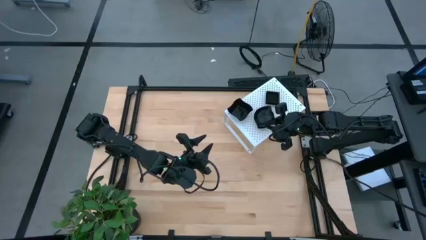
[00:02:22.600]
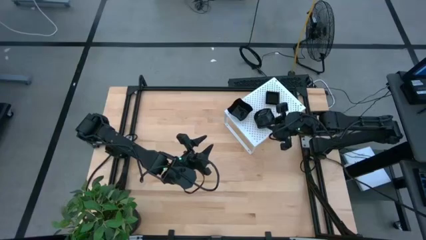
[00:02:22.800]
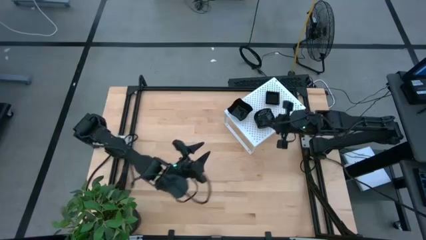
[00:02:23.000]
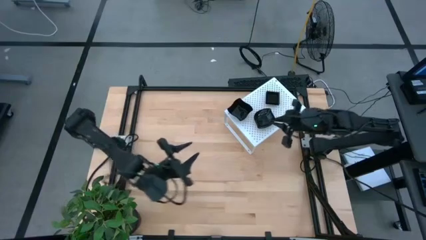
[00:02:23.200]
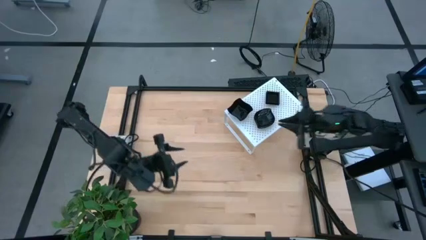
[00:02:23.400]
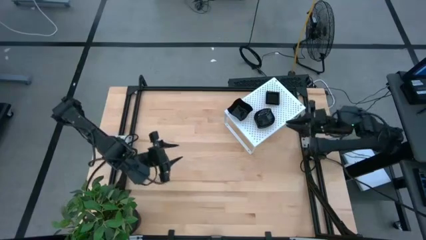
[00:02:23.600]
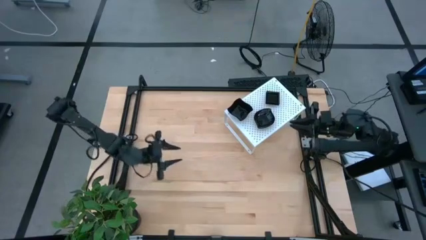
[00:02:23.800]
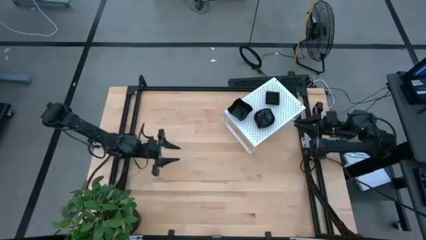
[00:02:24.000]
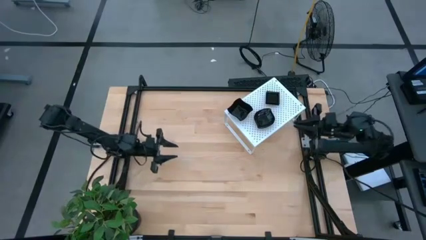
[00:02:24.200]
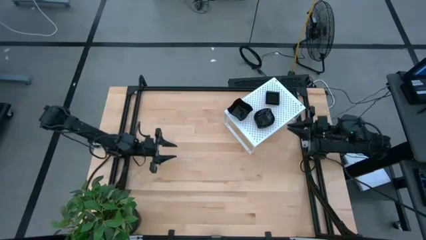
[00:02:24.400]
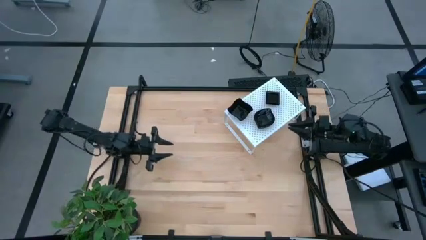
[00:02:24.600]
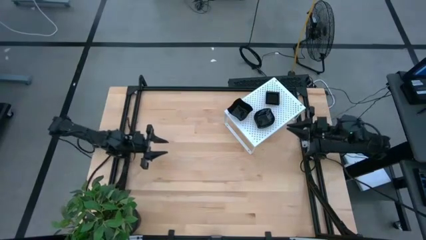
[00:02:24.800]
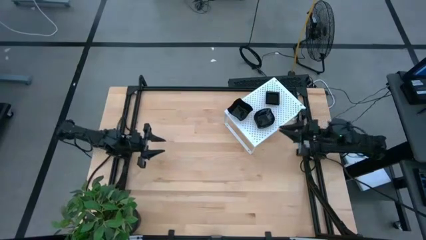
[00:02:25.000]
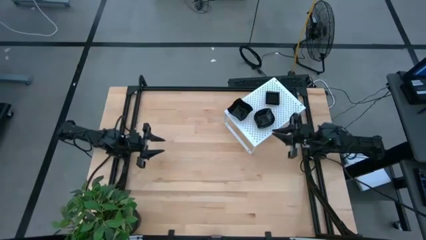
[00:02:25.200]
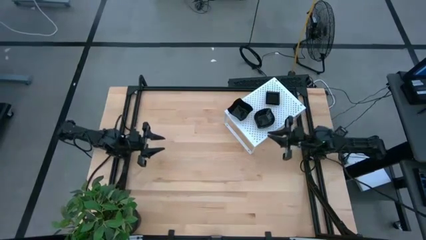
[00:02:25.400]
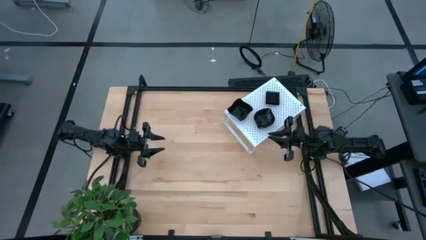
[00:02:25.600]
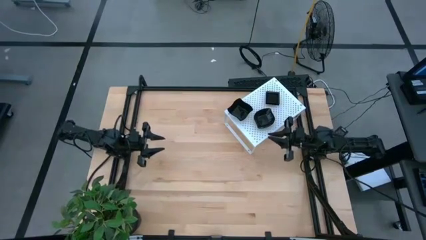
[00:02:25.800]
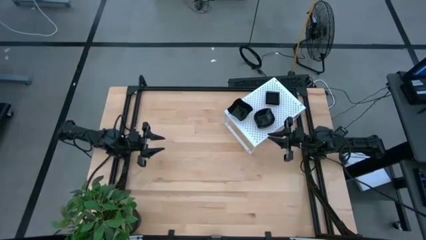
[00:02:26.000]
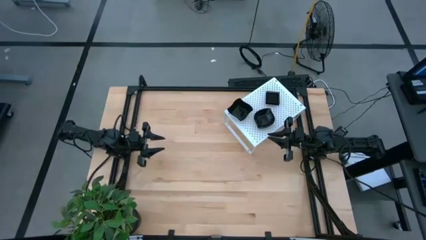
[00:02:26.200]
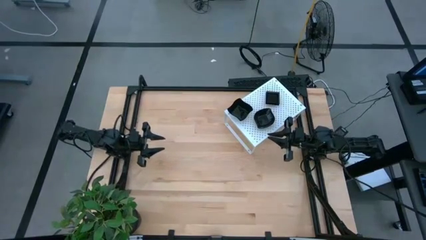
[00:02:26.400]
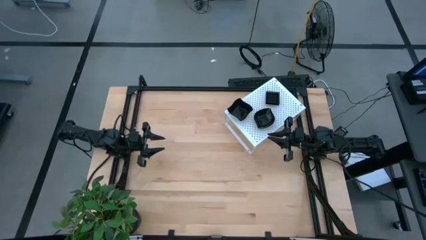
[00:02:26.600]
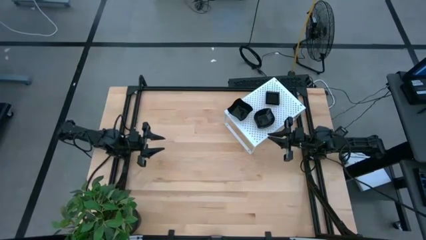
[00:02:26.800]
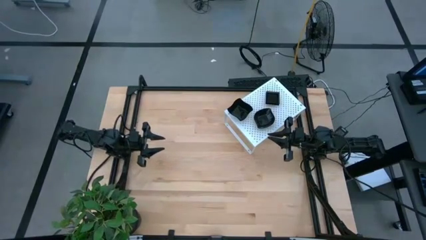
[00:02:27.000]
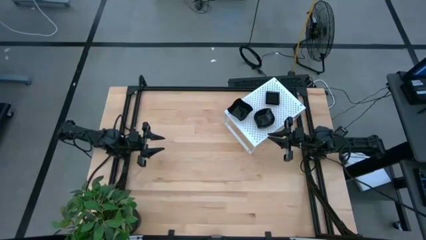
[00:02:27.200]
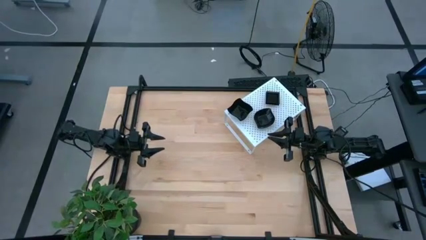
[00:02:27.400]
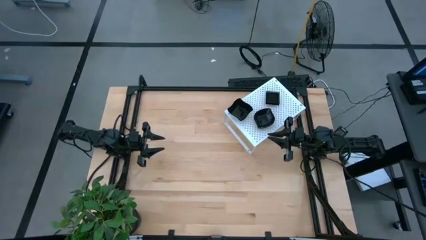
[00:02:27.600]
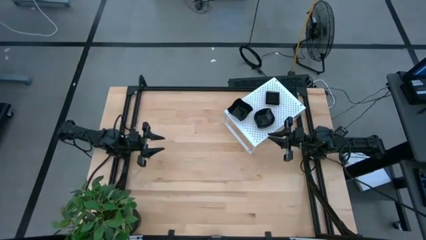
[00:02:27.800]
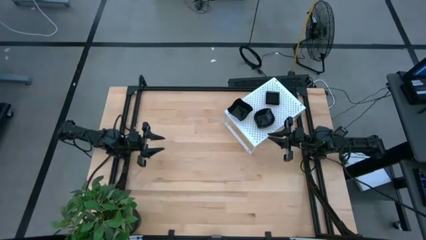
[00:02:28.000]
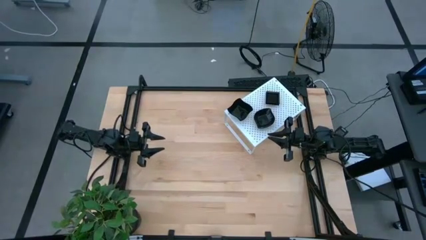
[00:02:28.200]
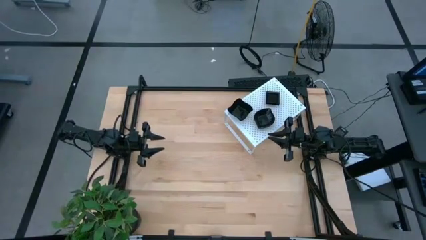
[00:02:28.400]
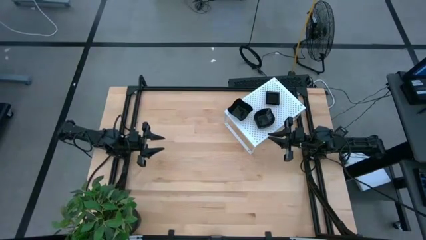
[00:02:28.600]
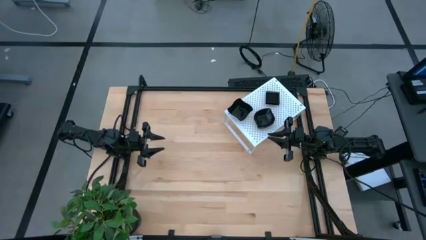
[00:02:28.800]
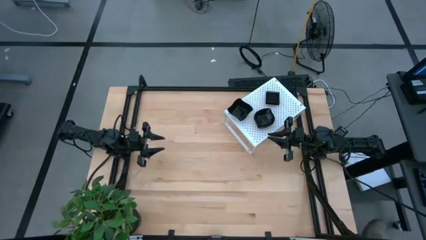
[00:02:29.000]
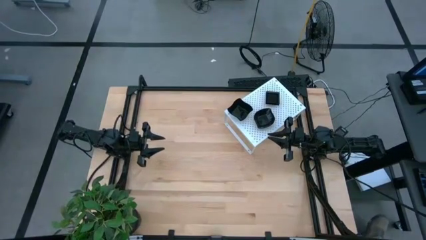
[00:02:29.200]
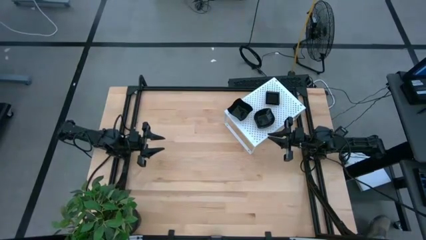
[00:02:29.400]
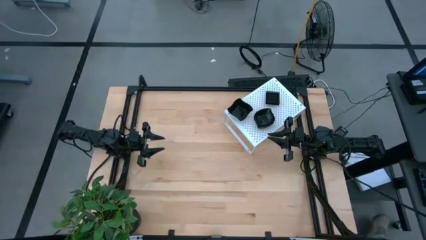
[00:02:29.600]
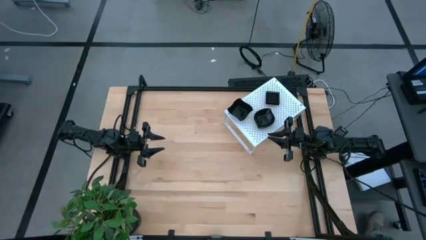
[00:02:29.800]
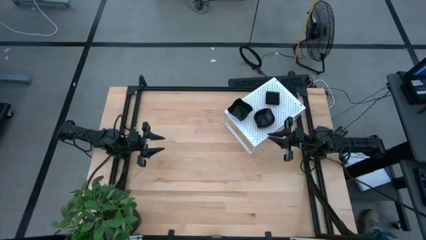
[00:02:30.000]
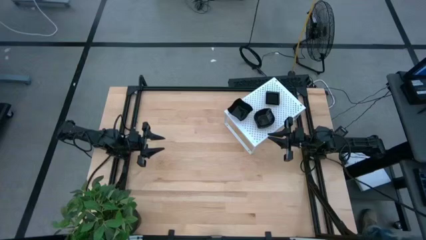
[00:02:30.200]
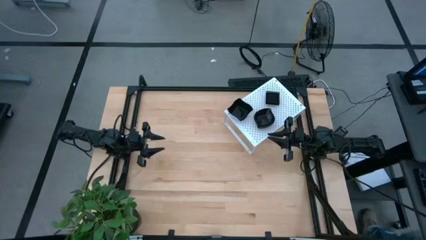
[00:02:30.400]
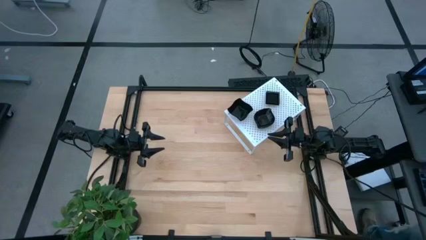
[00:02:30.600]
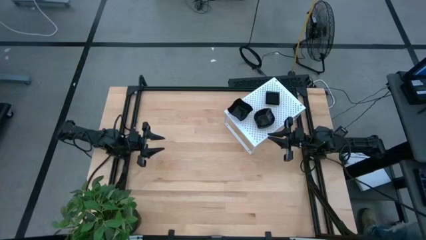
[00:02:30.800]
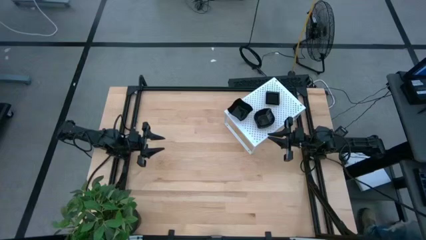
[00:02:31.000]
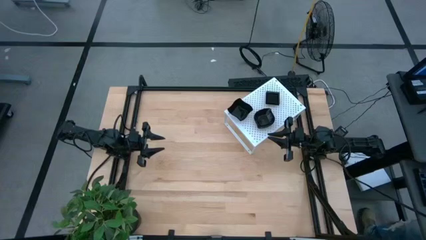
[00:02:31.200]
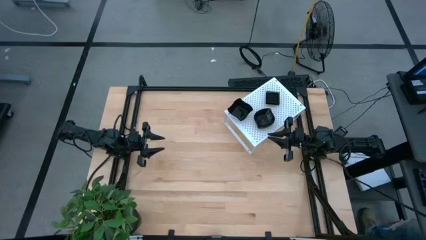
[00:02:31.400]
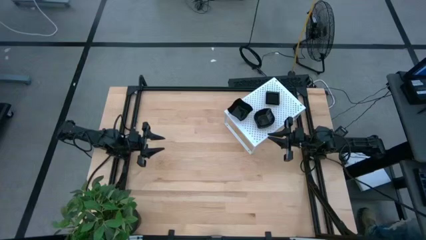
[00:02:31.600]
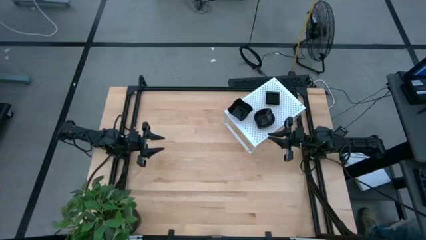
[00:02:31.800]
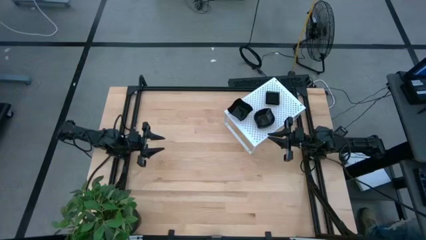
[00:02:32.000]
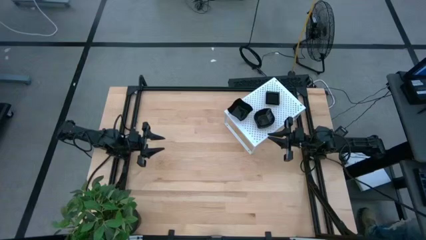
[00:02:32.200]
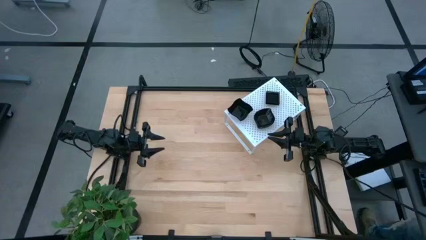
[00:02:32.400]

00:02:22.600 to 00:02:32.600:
Task: Pick & Place Mini shaped plates
Return to Home Position

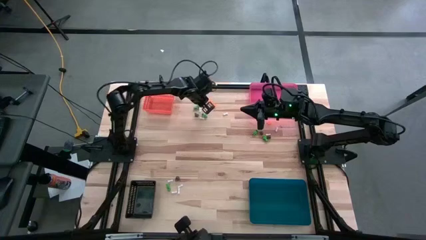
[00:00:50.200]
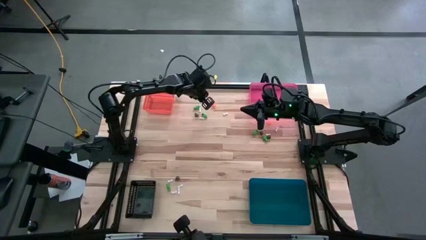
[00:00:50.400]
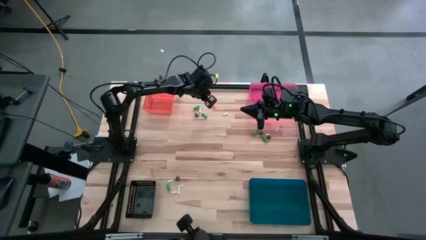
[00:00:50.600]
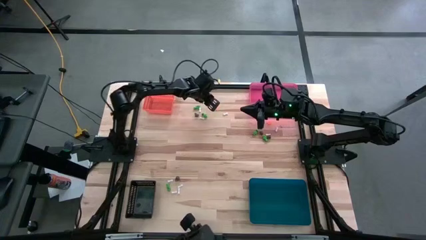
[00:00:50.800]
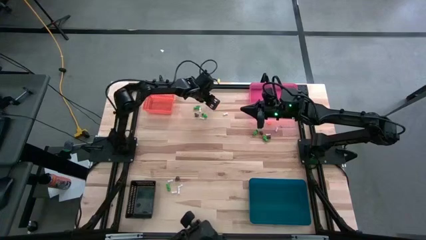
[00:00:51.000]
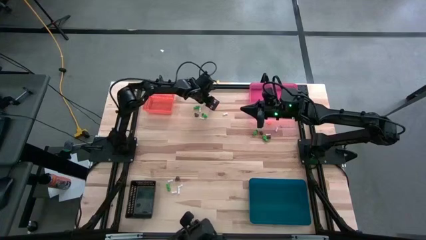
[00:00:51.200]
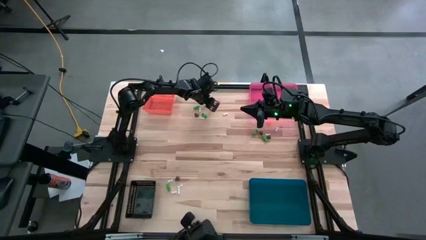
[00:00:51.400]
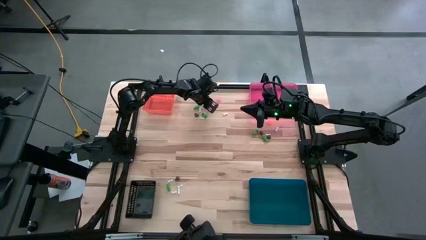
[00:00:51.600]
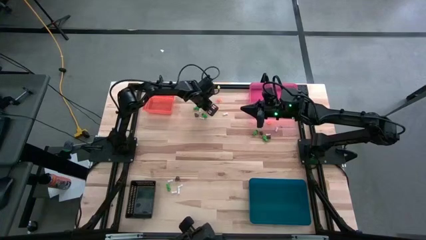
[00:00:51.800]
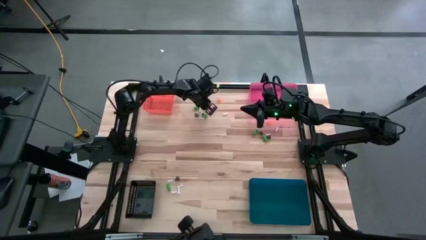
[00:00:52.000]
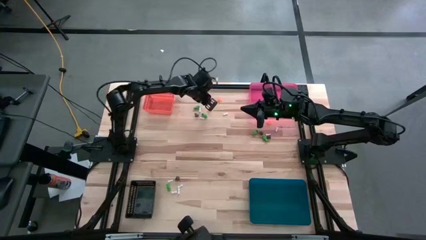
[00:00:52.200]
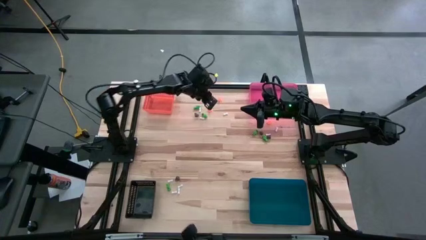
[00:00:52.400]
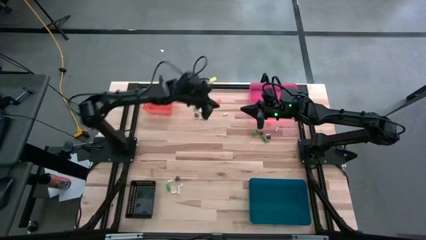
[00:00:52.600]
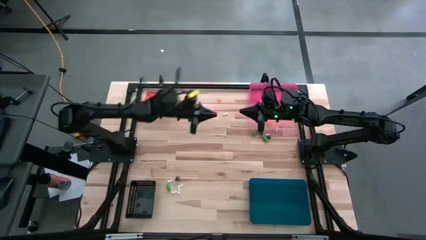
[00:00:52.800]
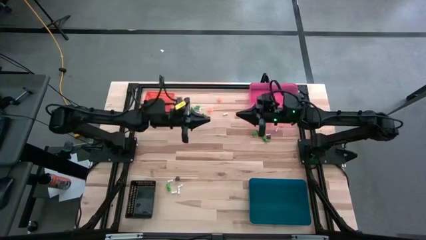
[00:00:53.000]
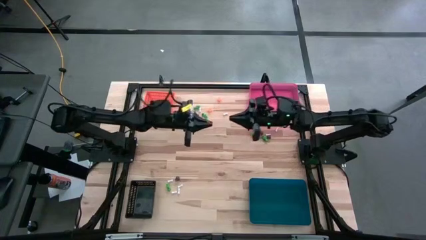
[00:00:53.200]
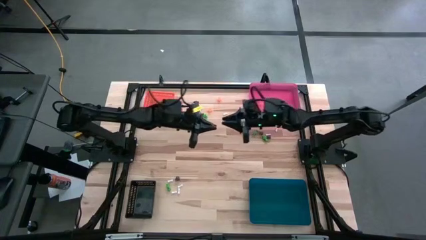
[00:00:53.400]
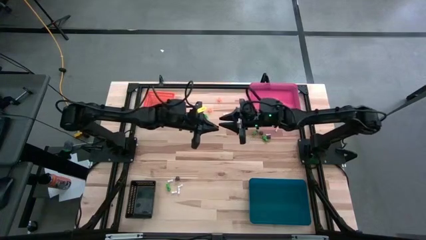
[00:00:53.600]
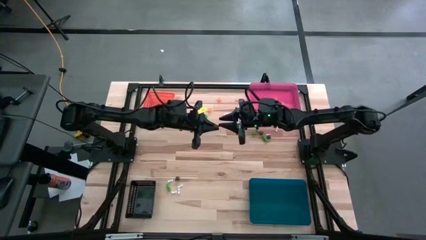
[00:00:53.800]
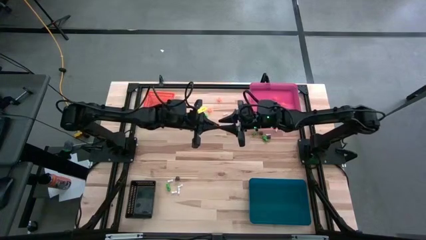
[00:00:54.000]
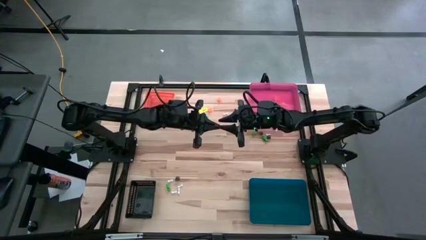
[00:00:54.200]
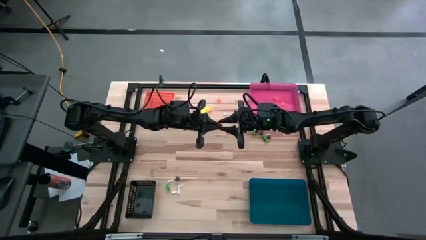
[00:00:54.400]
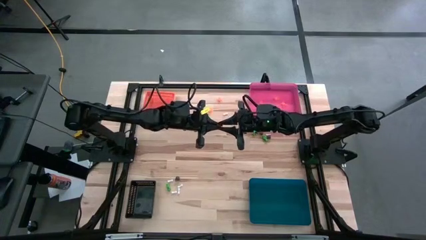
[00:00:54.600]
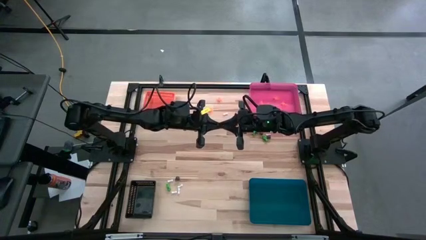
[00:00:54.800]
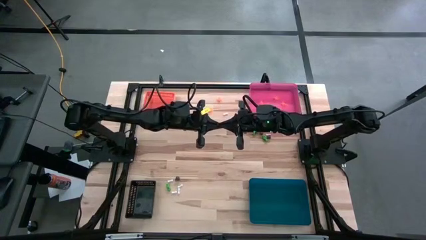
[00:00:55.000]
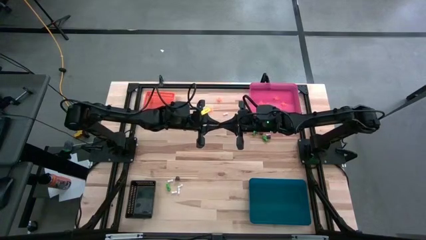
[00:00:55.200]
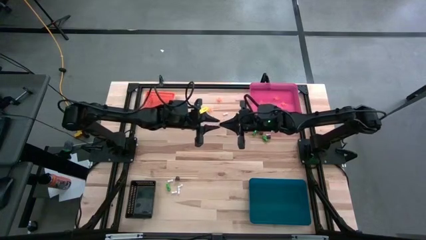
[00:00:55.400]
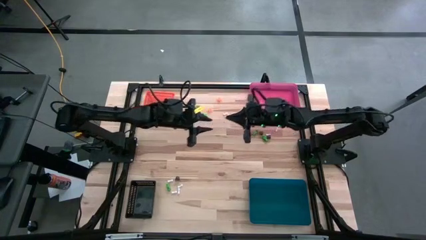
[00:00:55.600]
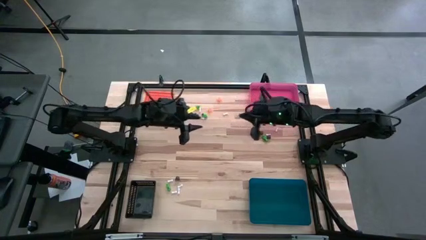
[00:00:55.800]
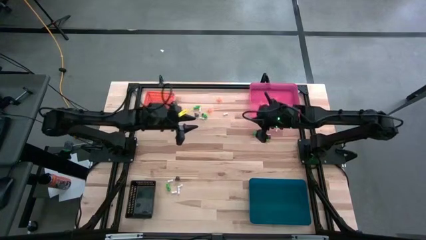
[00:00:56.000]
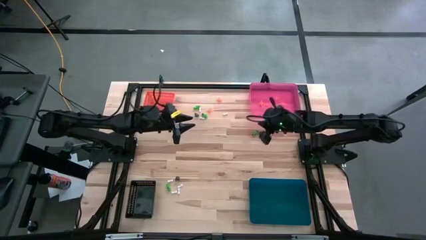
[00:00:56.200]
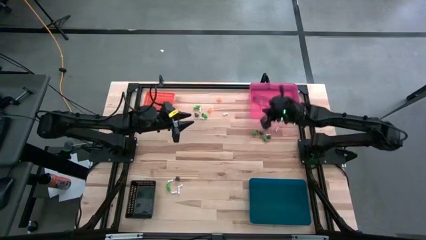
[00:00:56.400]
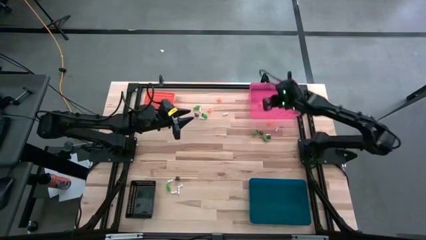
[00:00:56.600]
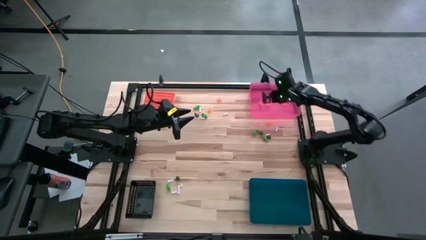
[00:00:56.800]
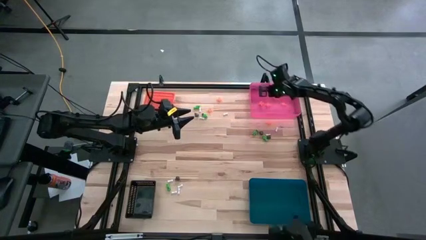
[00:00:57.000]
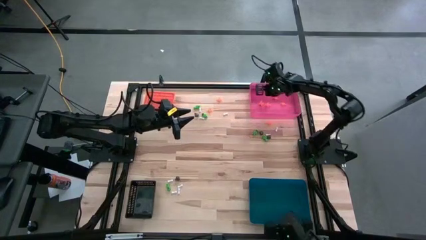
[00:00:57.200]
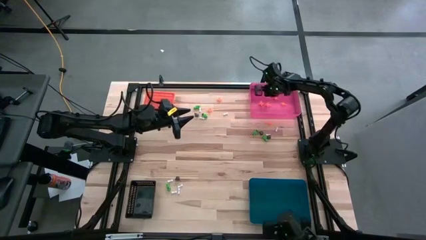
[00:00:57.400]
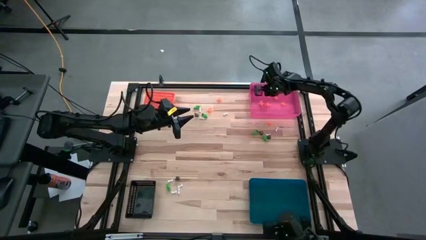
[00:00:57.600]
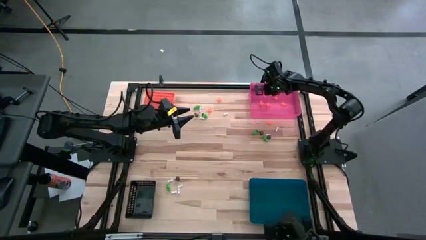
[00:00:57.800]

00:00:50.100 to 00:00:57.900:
Task: Sort Halloween decoration
Put the orange spider toy into the pink bin
